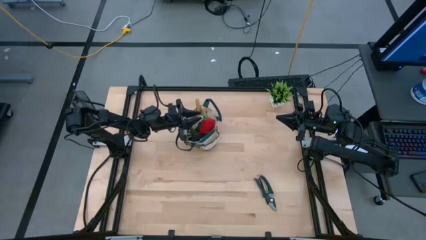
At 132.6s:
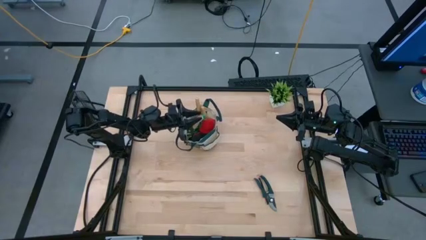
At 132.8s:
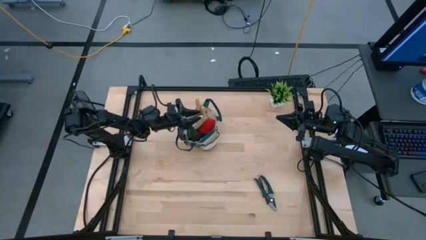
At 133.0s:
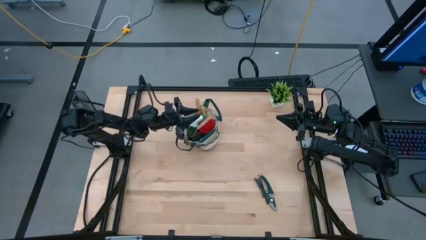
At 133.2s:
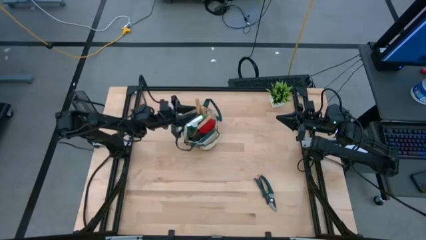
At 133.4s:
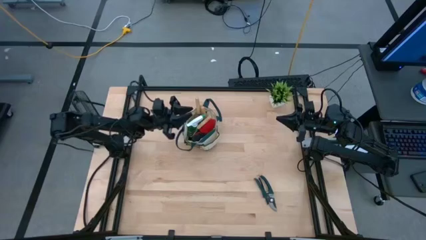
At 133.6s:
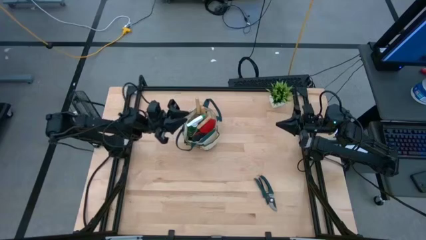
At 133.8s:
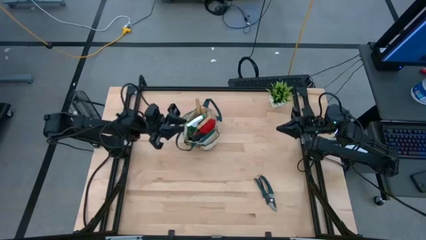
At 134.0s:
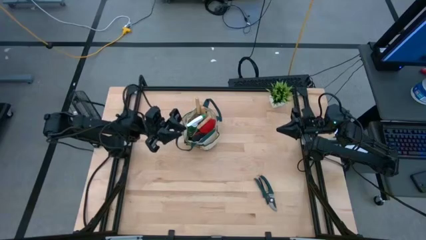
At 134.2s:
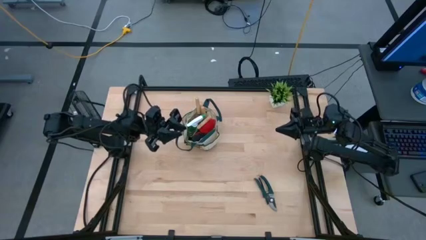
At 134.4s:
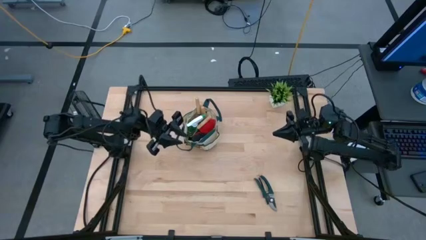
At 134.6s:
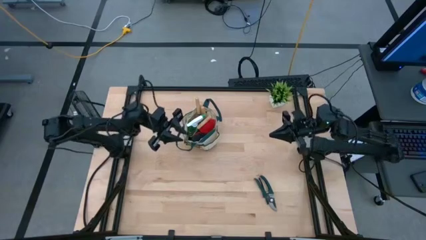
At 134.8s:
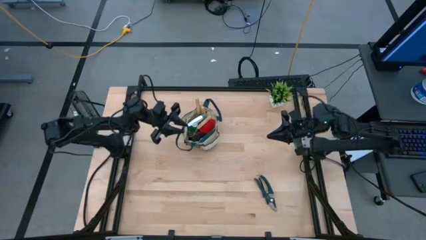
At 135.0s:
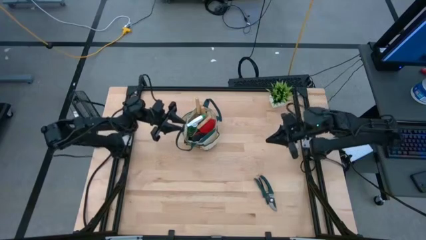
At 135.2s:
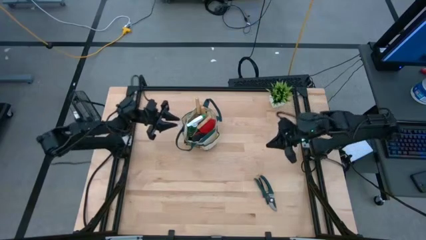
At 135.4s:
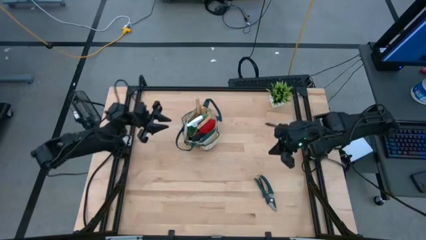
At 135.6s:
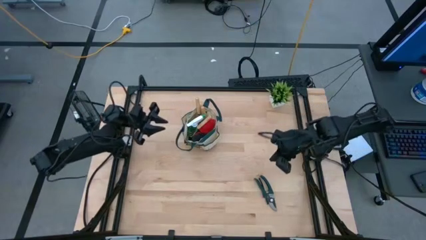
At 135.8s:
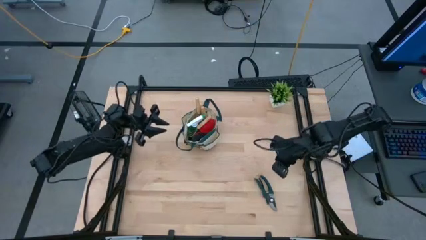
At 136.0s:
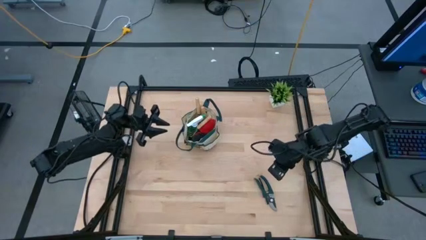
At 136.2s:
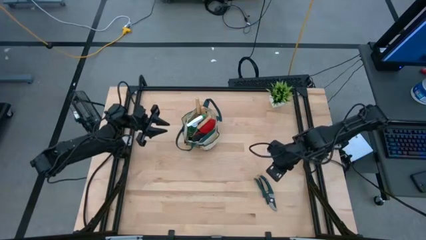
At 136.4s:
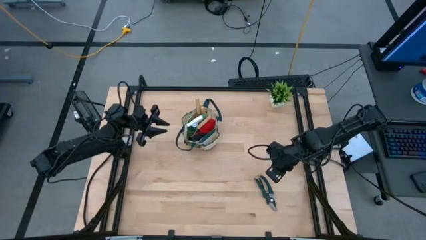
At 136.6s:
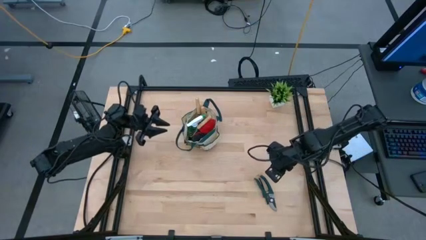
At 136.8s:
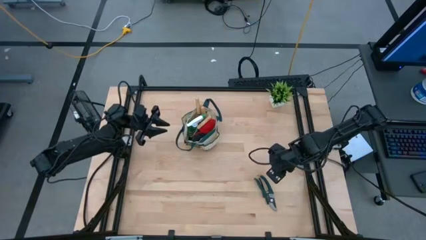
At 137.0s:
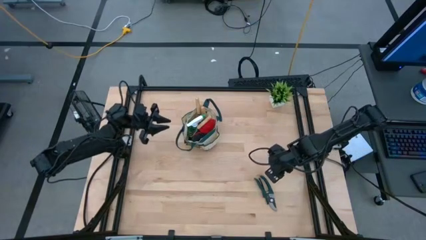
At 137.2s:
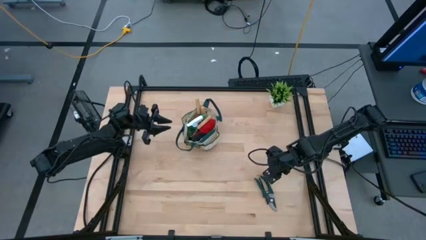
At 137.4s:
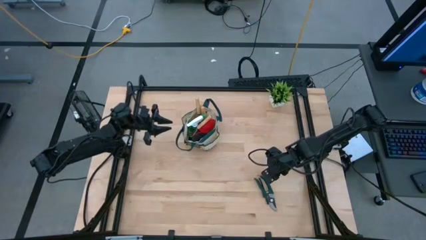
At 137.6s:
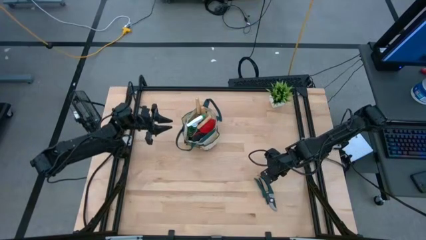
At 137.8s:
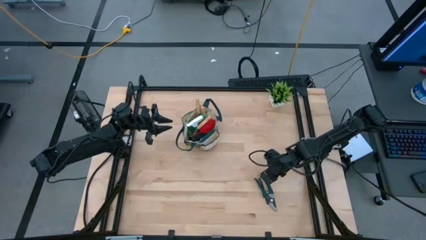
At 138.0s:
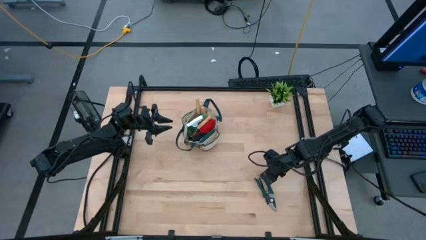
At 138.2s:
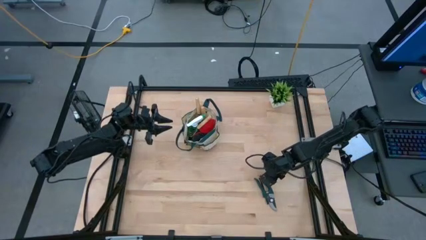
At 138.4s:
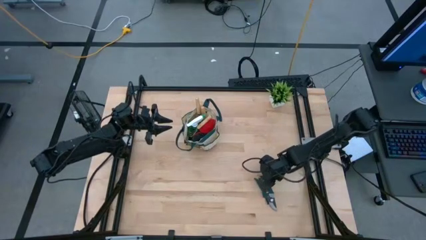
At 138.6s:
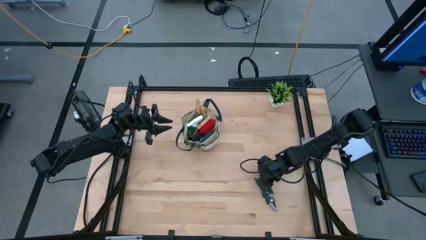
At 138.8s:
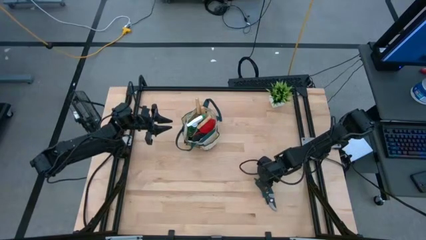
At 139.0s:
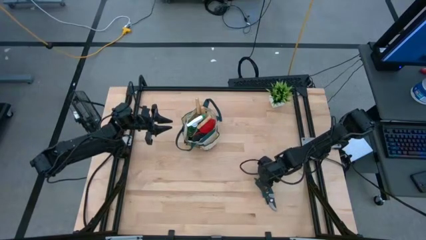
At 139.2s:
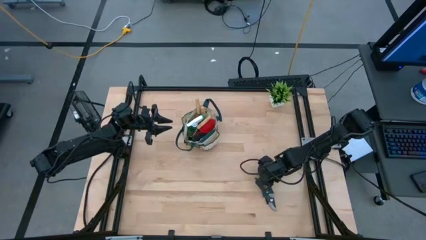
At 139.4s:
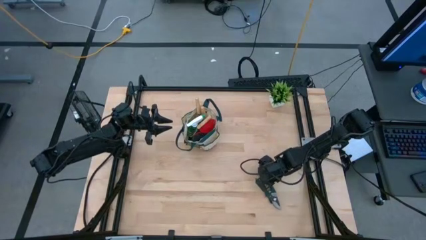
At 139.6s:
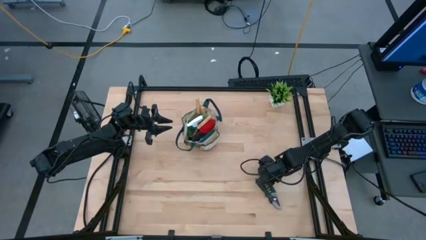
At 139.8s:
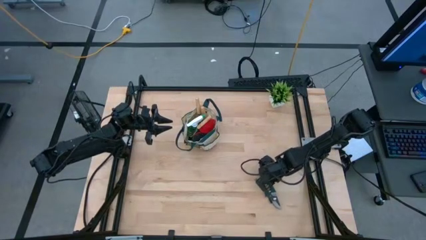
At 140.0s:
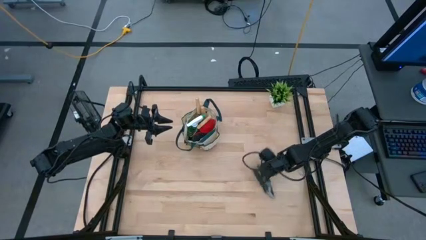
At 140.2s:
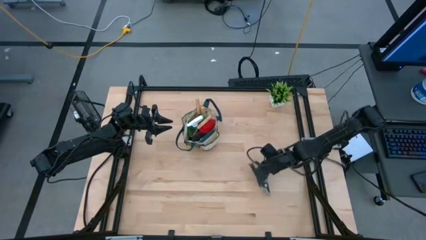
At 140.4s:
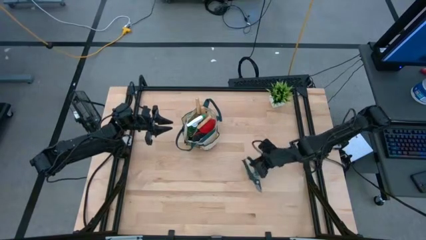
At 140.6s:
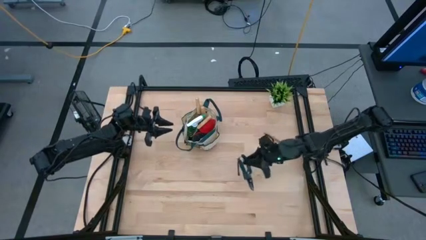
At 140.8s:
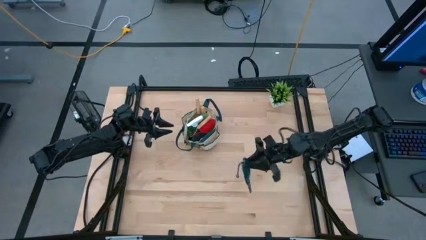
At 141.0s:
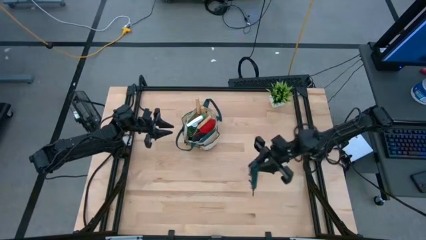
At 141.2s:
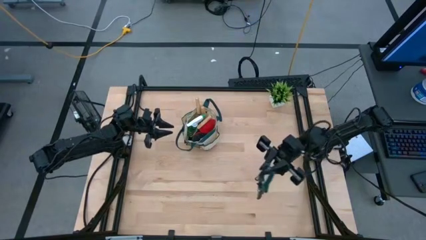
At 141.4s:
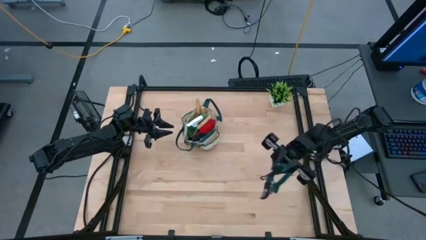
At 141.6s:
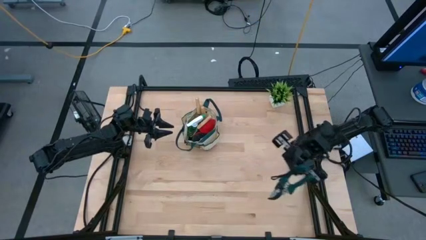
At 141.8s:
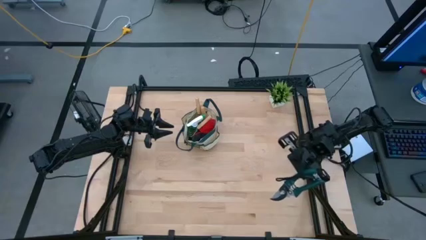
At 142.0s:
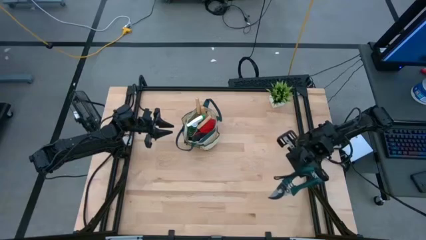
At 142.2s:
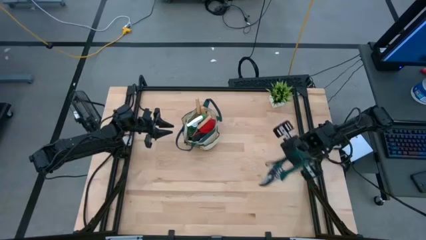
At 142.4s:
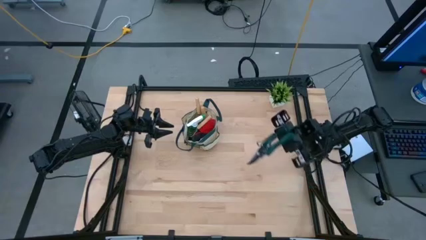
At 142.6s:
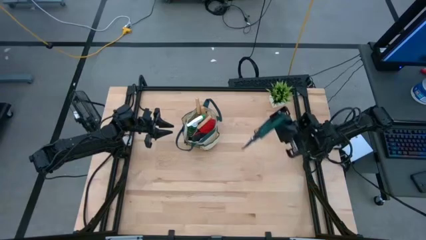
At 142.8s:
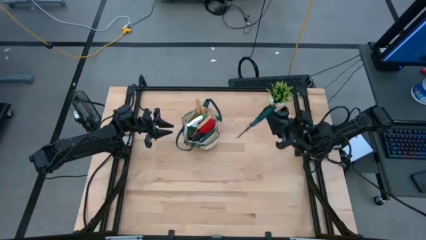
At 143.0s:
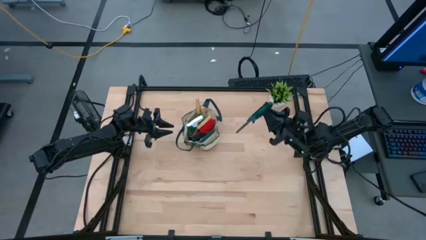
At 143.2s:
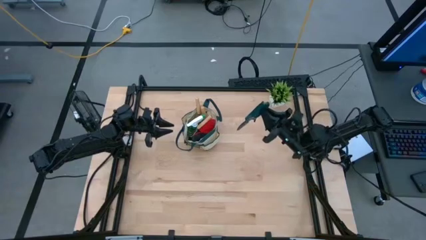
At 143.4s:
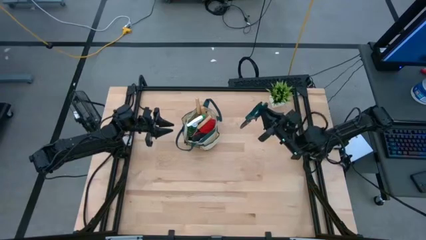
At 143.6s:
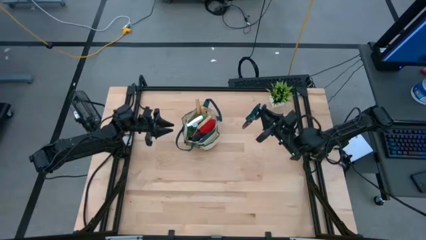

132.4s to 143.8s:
Task: Pick & Place Garden tools in Gardening bag
Put the shears into the gardening bag

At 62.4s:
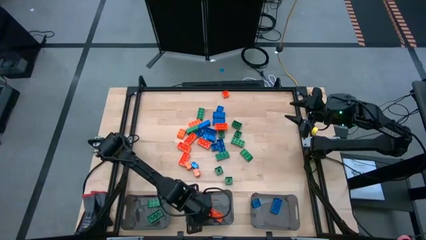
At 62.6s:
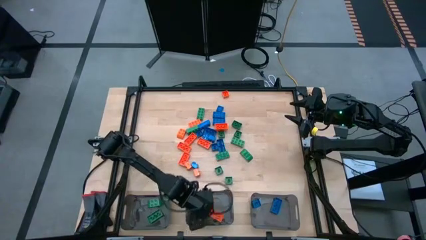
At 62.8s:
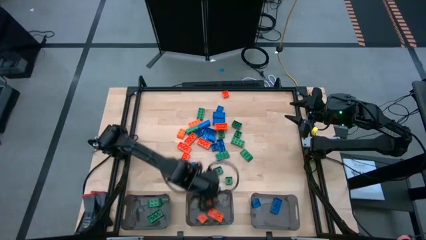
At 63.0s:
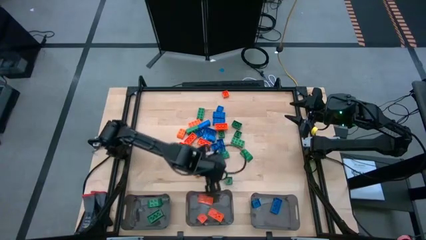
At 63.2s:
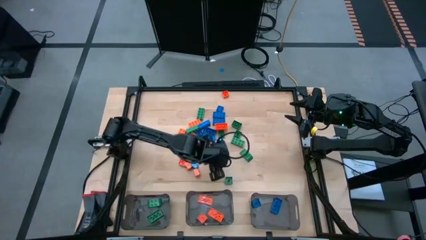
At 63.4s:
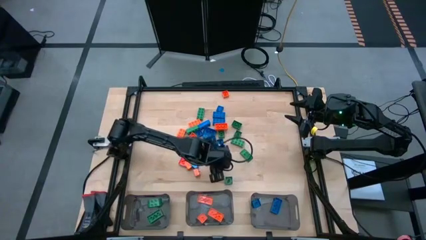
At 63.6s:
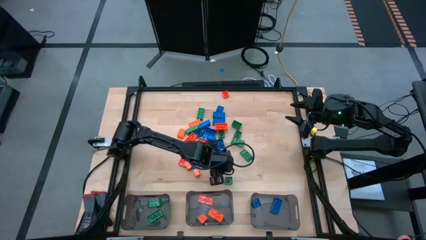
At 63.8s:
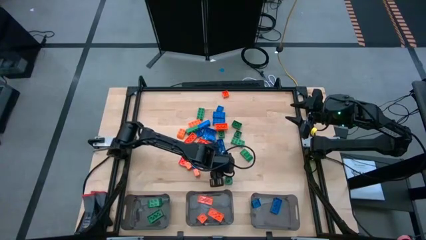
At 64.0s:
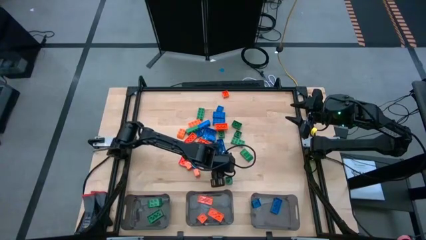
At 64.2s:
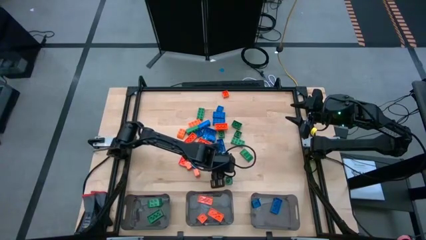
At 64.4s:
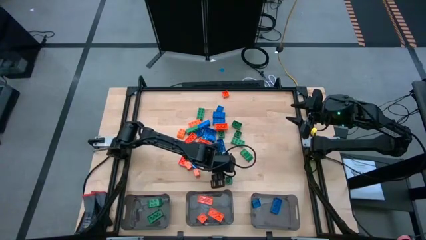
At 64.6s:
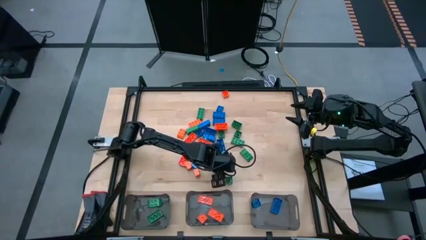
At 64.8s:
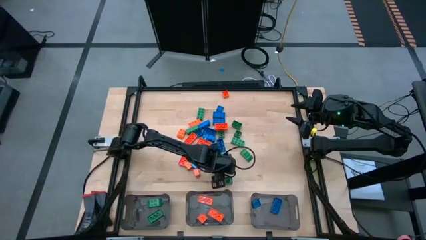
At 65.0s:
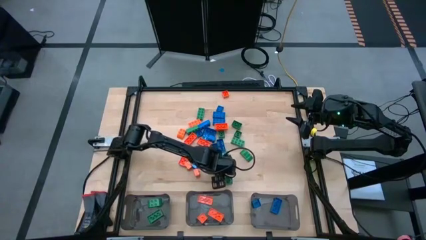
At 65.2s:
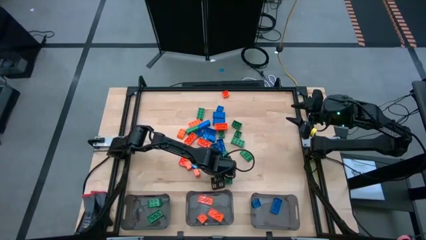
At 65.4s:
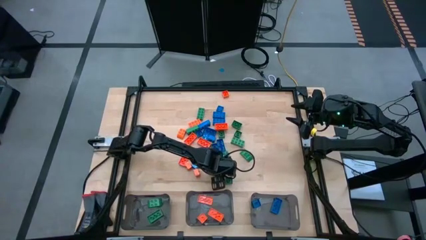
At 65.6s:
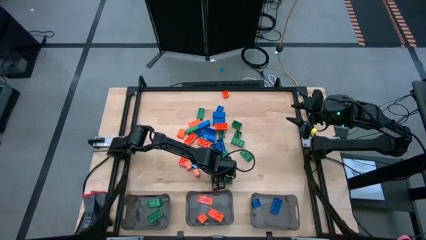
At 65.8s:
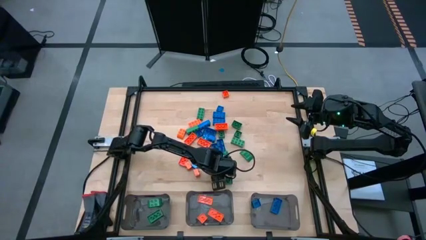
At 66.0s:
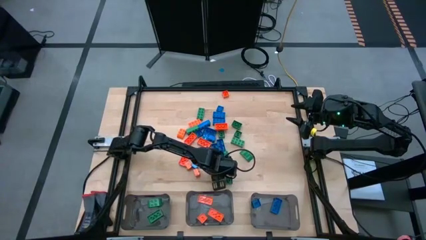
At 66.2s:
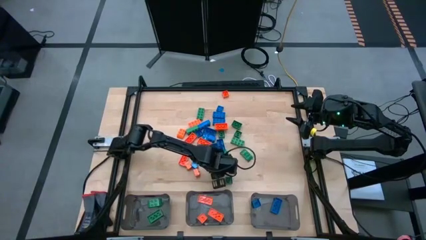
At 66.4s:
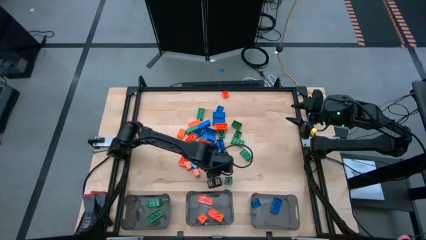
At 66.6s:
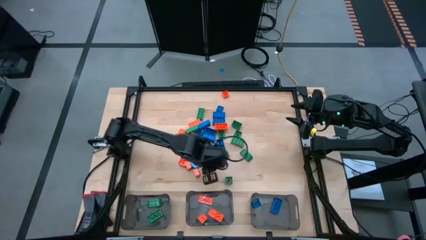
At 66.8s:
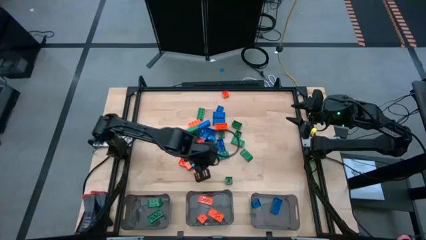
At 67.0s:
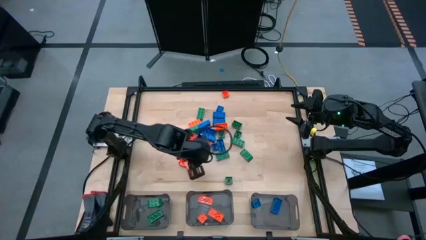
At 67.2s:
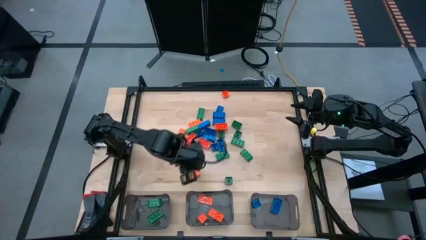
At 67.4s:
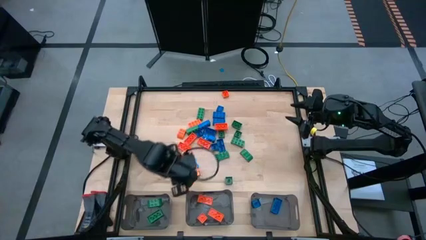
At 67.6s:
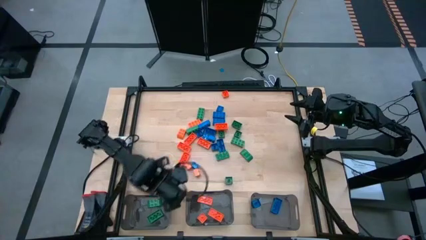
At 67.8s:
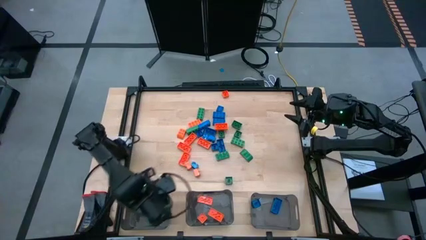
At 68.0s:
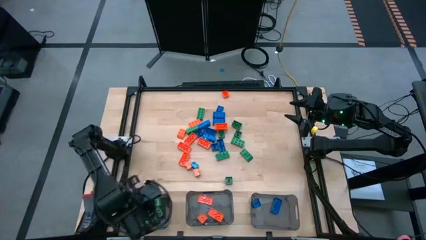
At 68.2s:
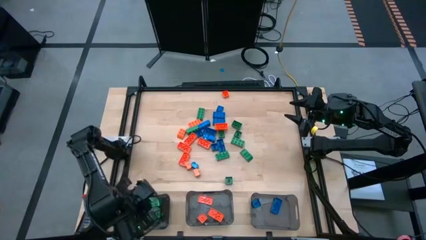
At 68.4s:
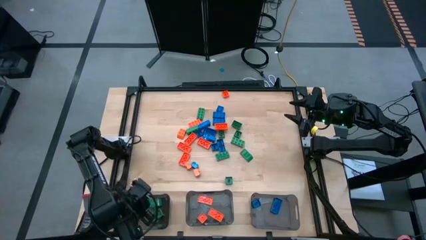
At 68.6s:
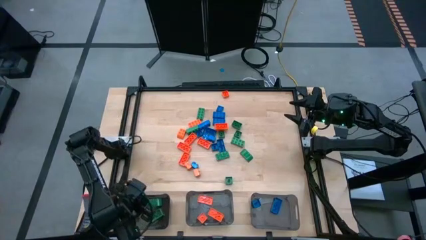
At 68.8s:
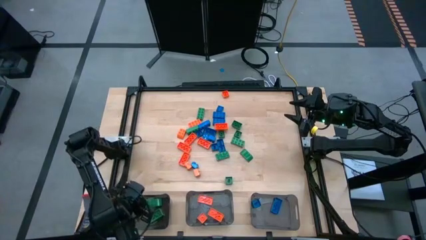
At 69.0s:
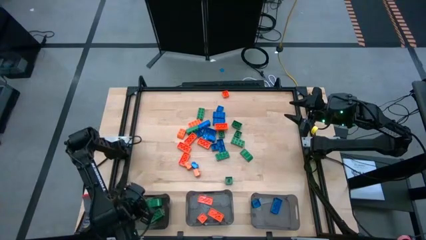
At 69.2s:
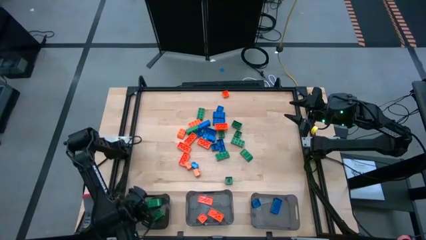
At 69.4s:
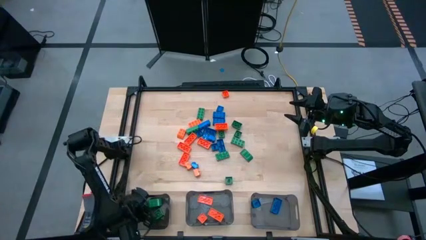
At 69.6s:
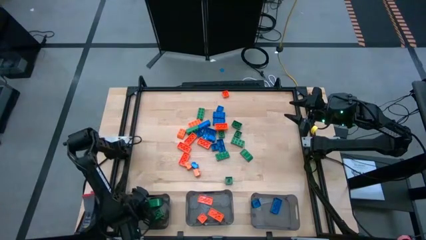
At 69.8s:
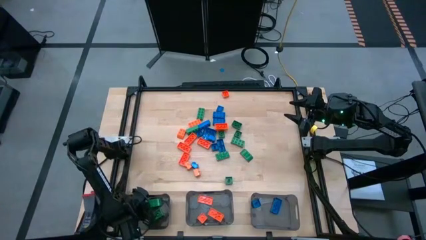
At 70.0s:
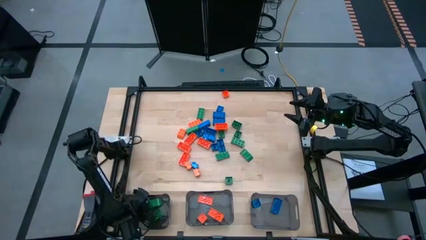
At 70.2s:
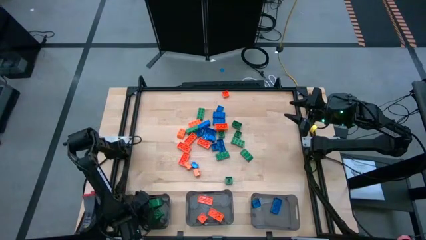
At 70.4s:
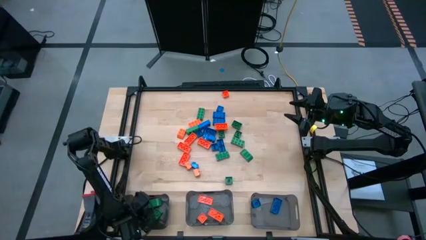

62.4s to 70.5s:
Task: Sort blocks
Put the green game piece into the left black bin
